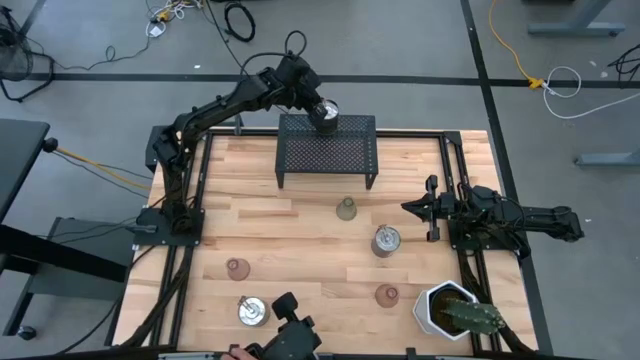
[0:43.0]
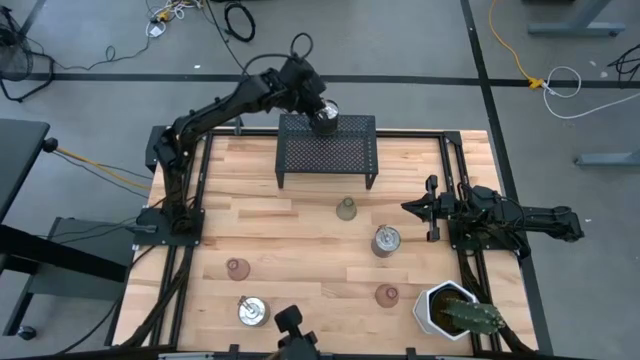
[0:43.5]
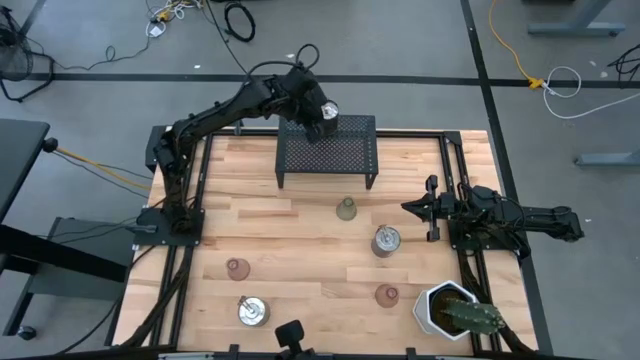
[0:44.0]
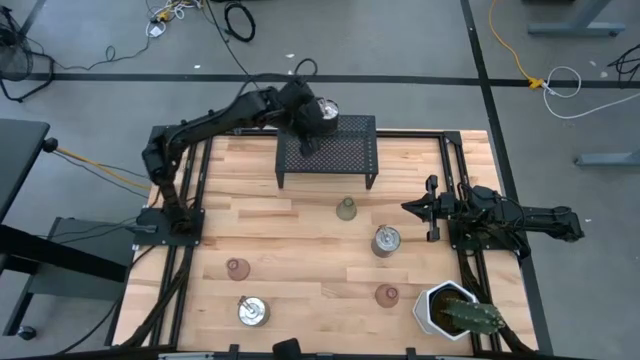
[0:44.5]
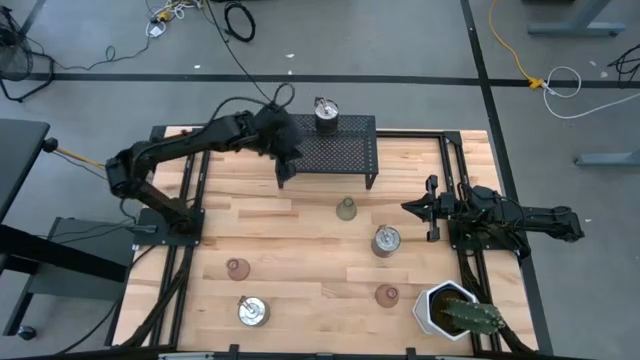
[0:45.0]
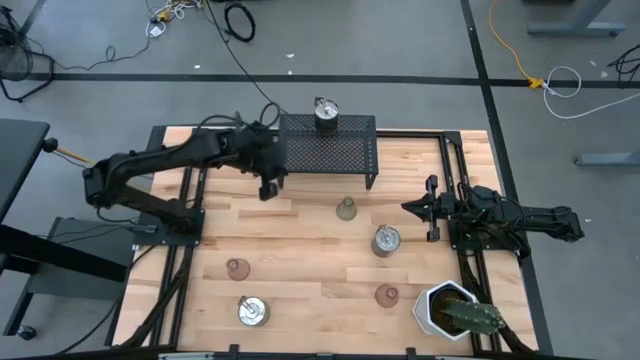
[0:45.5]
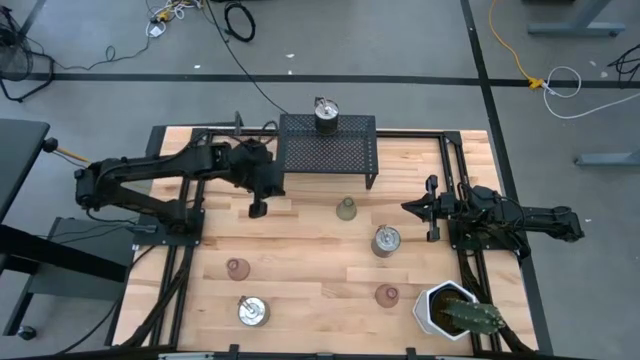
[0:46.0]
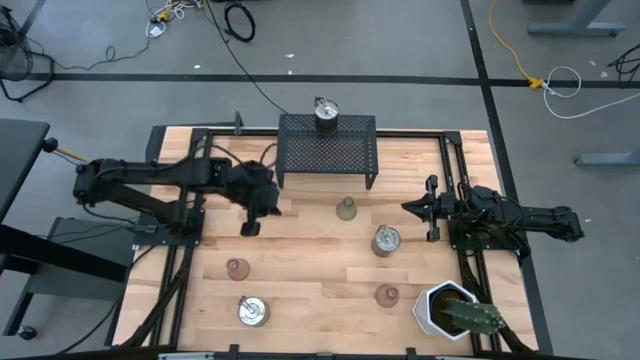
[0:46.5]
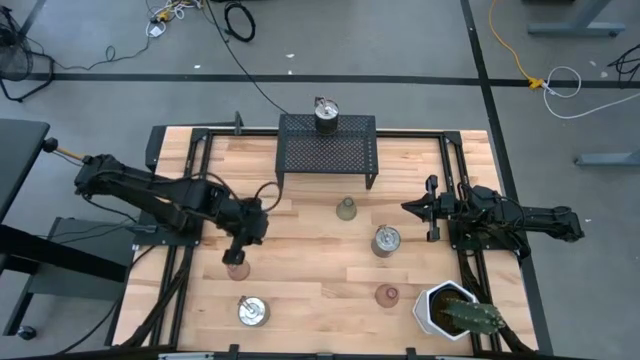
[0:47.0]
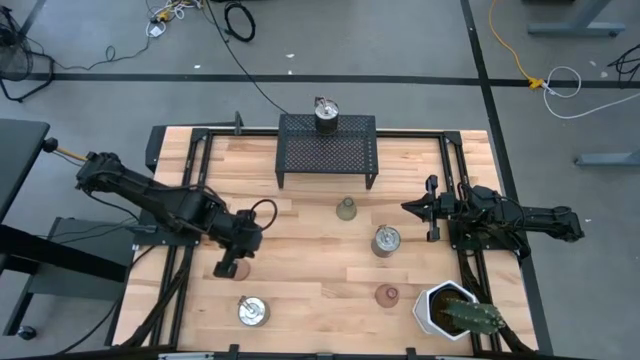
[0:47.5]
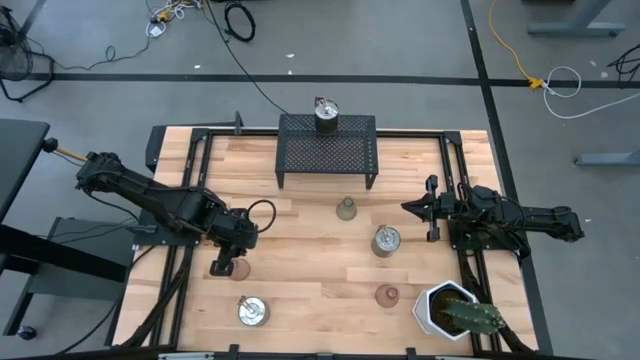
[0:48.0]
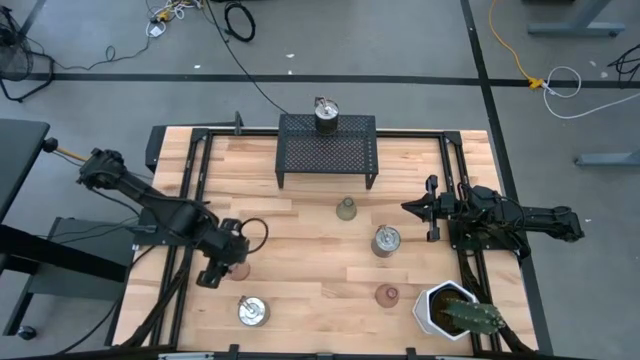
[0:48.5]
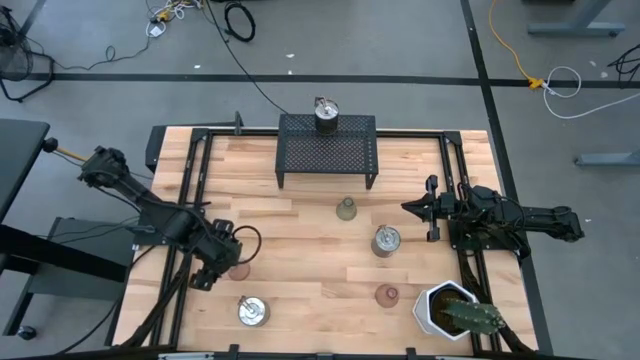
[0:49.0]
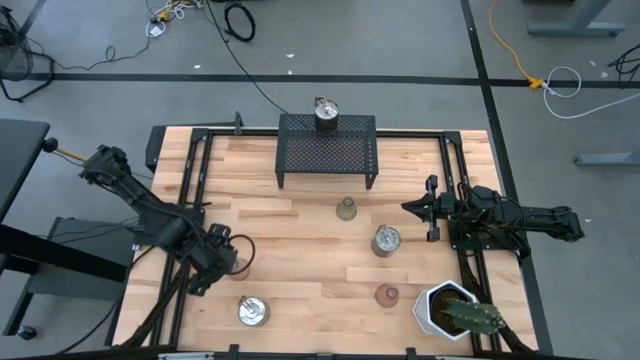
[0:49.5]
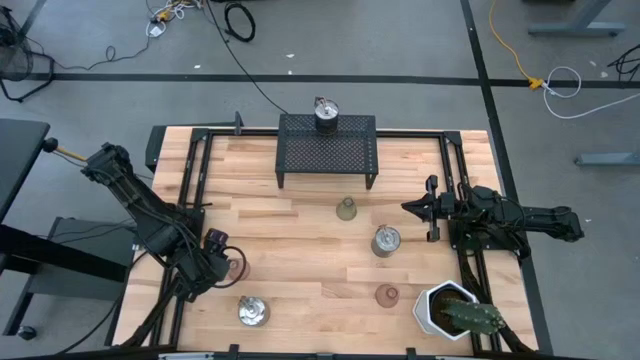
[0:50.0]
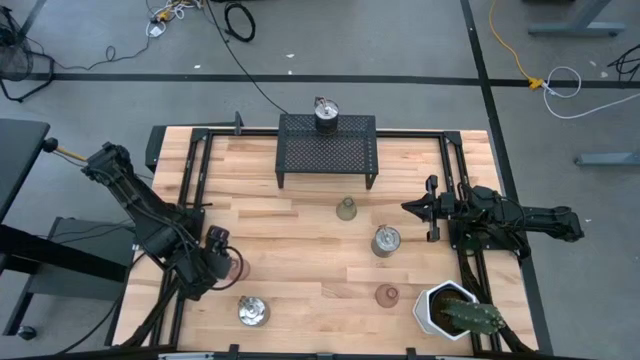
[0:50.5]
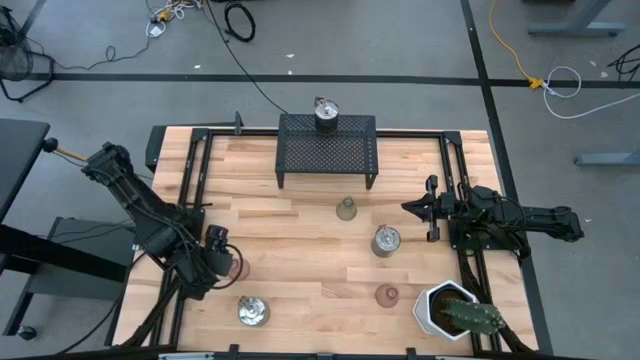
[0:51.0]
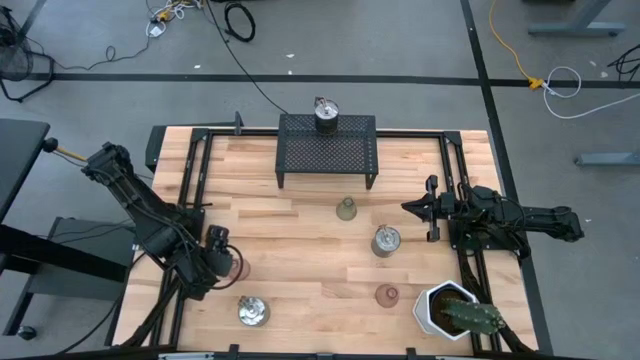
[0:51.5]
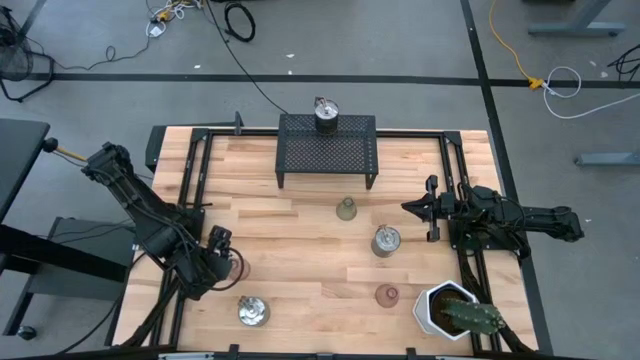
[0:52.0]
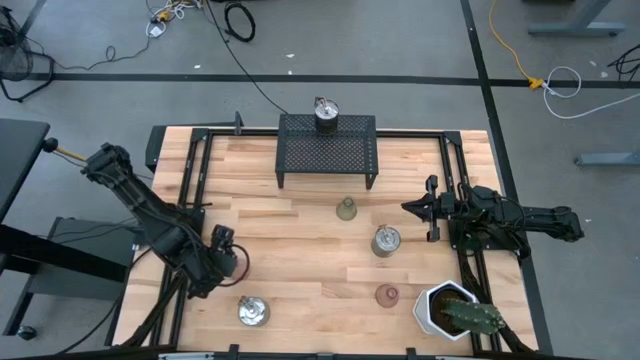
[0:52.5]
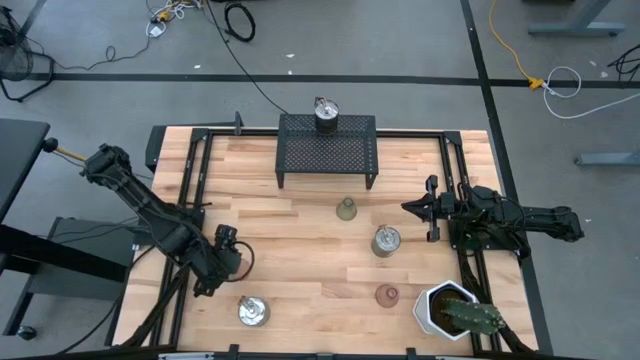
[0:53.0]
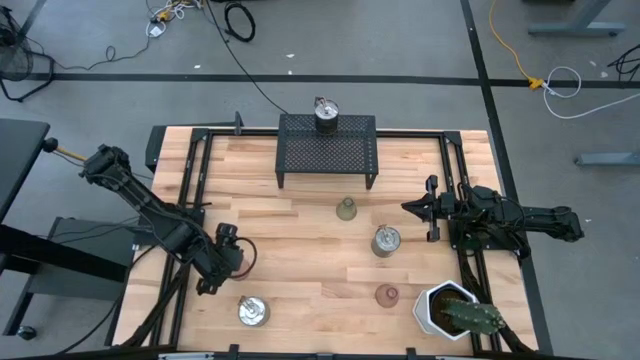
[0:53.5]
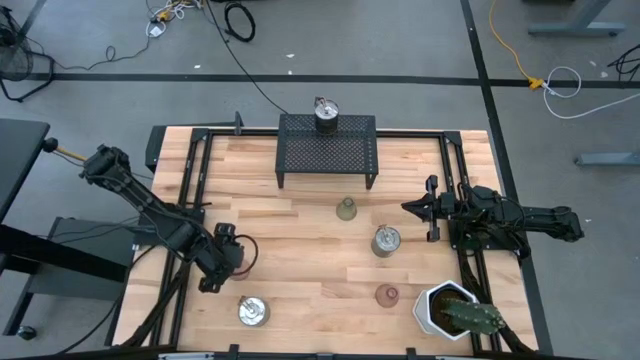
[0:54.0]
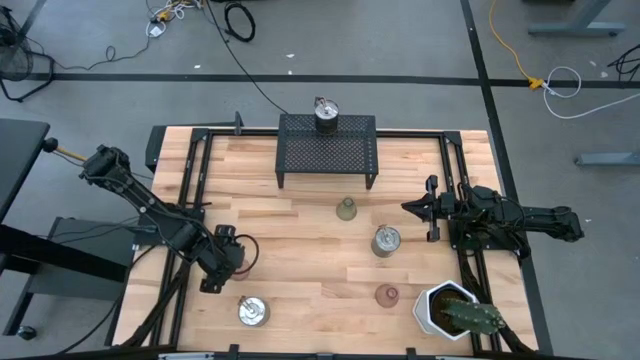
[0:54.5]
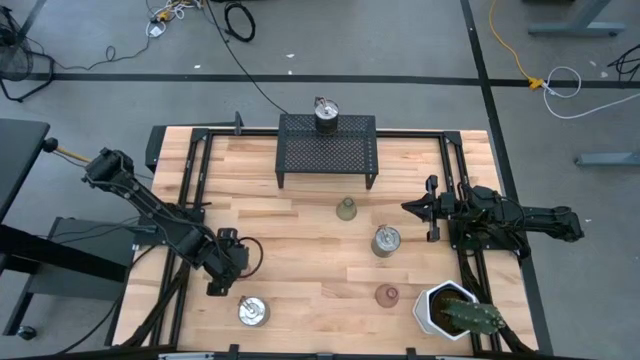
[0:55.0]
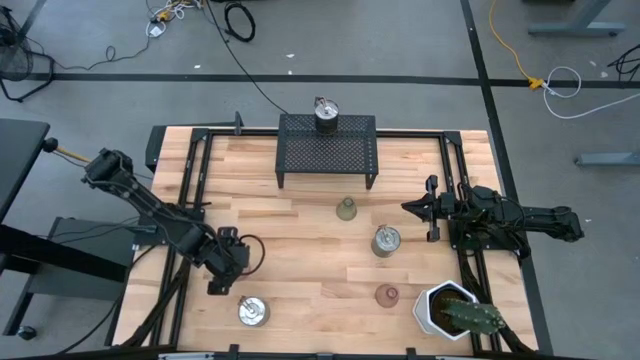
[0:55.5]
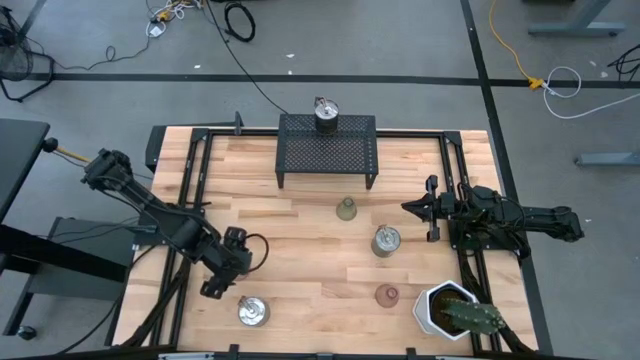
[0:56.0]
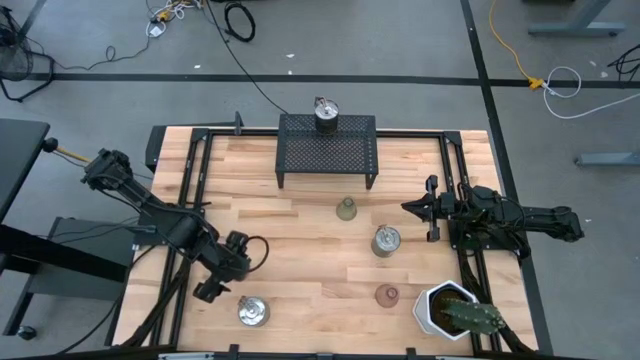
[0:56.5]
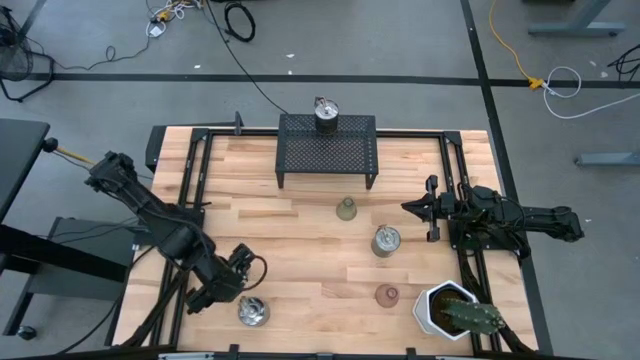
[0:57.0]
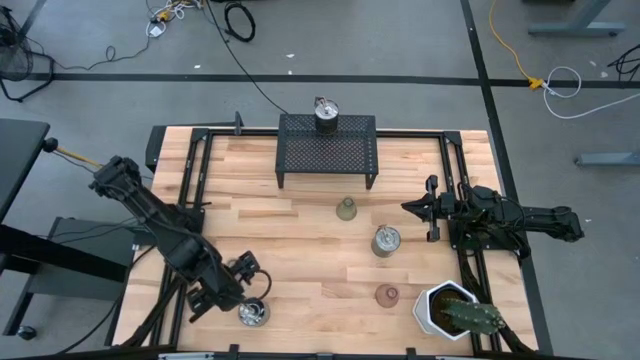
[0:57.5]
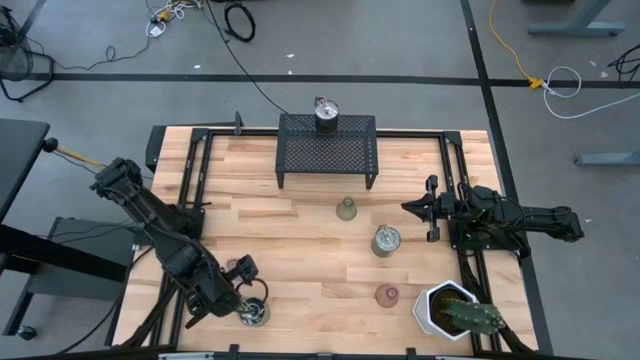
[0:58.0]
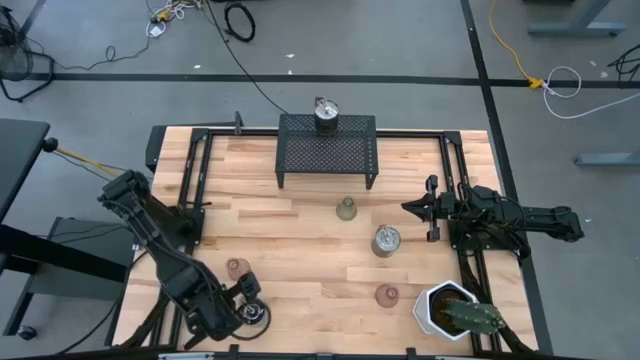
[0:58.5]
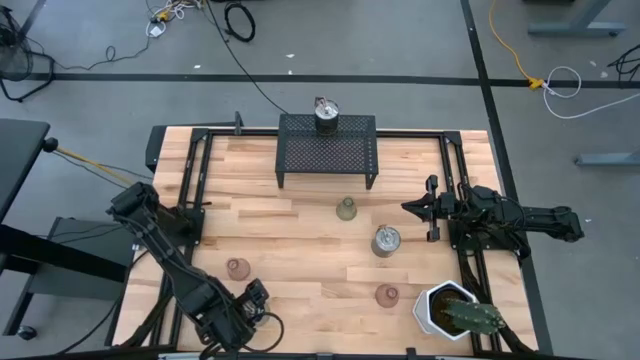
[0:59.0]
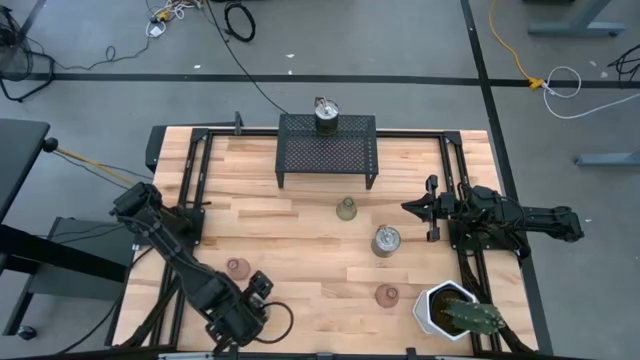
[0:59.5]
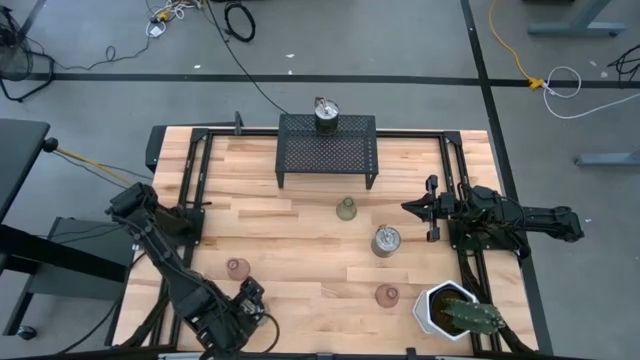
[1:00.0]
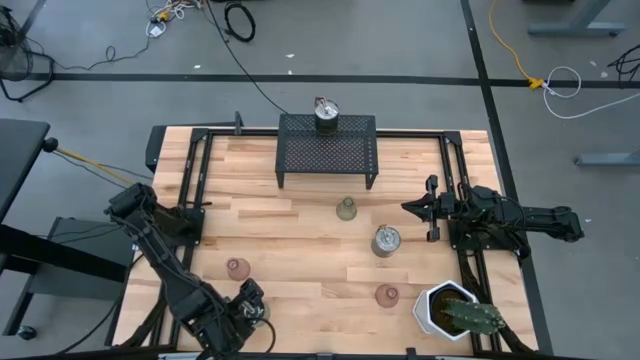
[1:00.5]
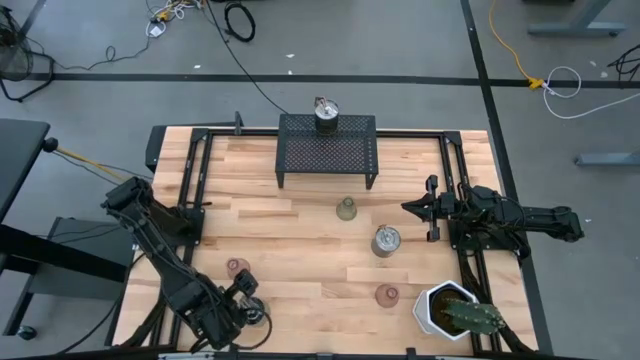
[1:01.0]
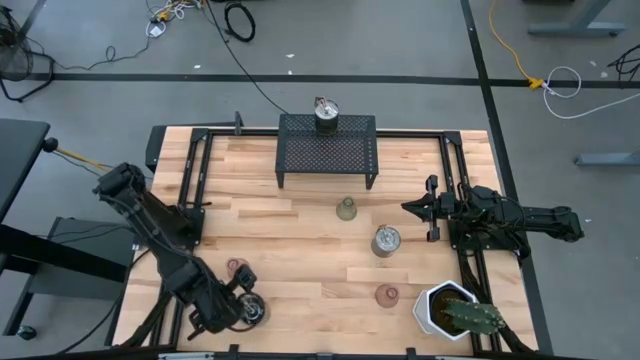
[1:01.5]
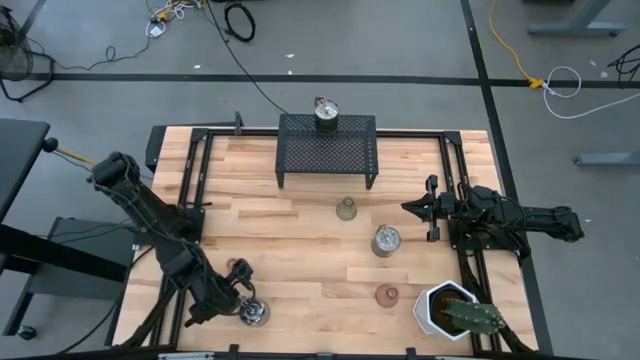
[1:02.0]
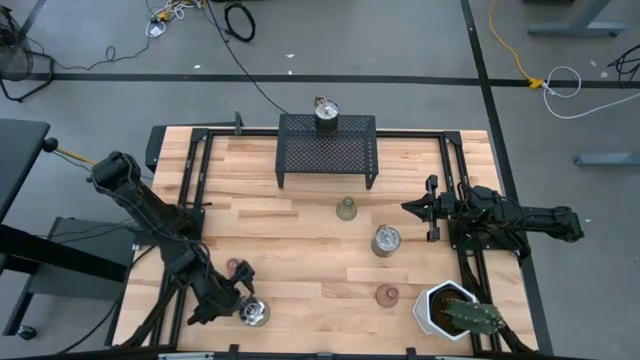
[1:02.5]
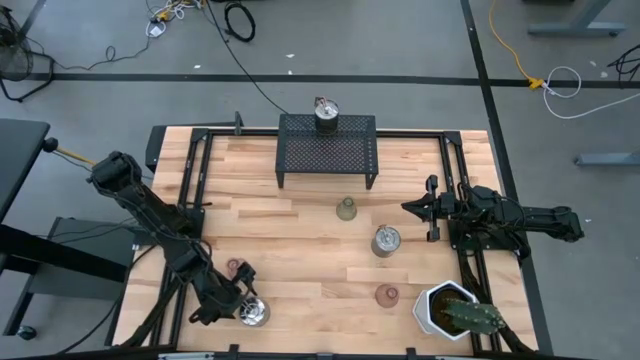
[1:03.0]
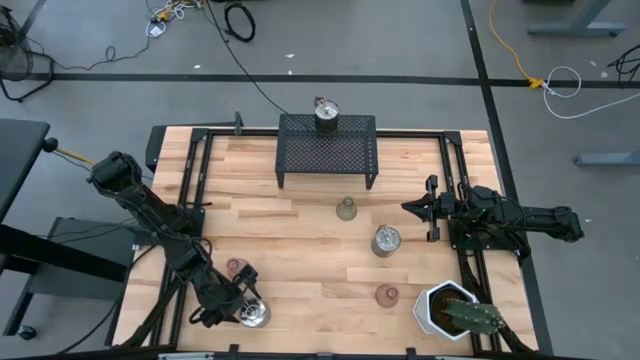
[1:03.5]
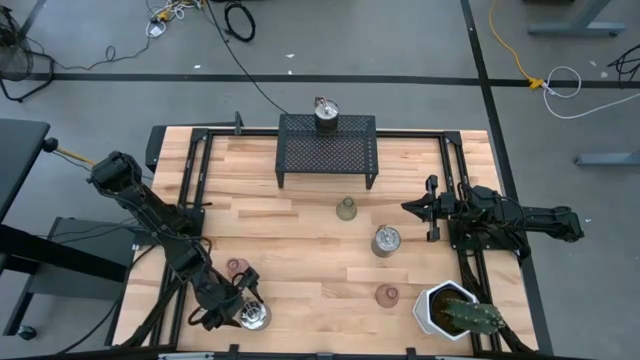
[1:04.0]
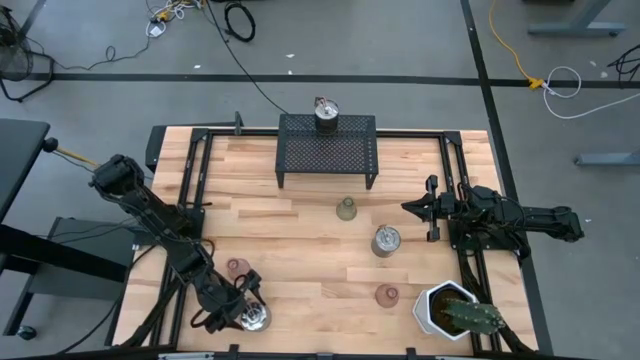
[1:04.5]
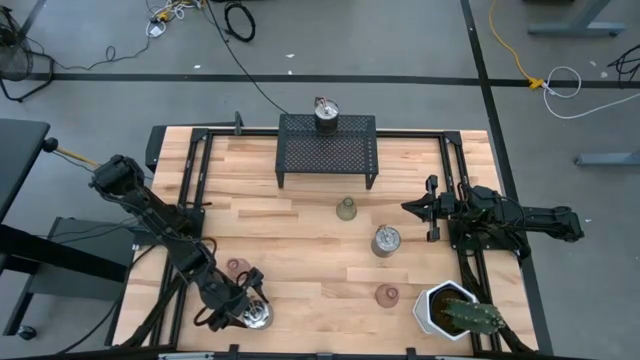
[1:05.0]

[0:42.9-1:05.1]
Task: Pick & Place candle stick holders
Put the bottom silver scented candle on the shelf
